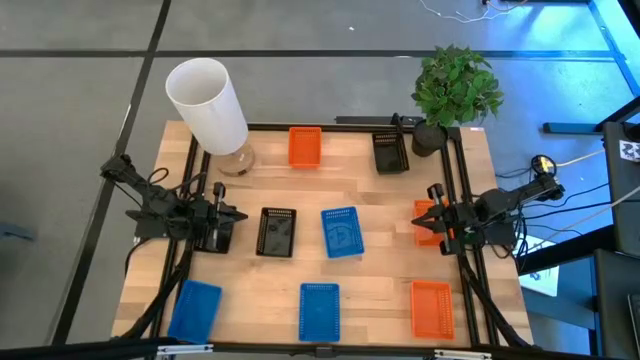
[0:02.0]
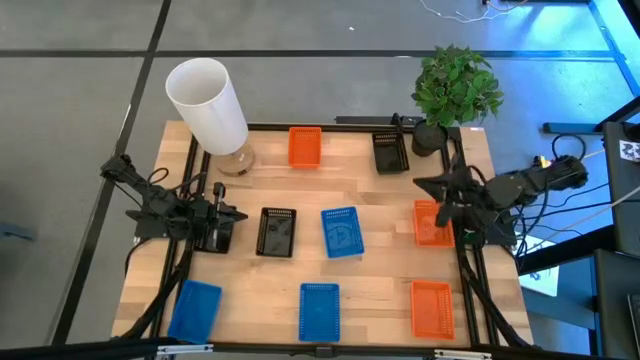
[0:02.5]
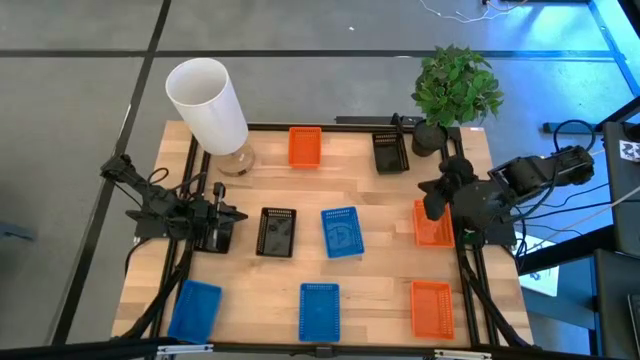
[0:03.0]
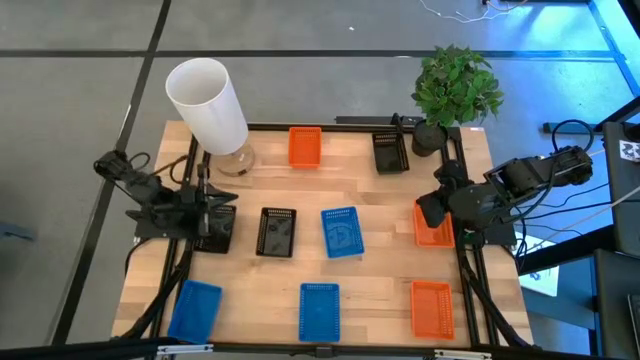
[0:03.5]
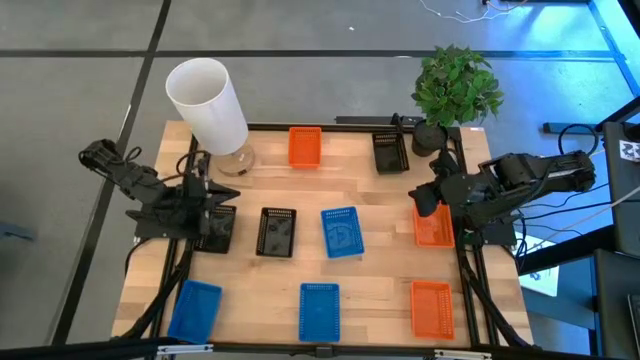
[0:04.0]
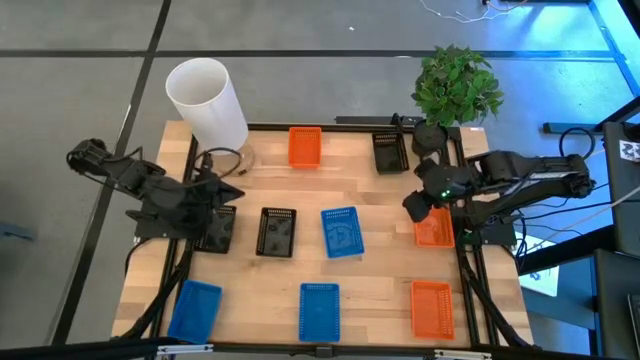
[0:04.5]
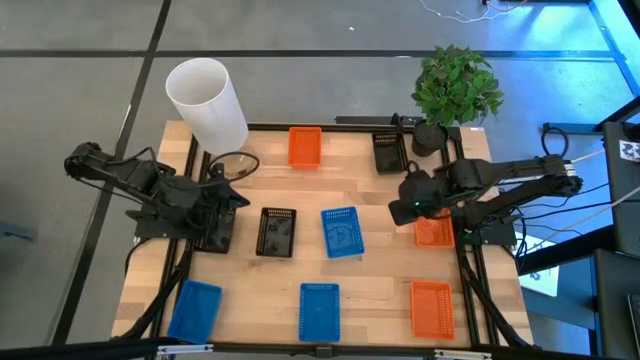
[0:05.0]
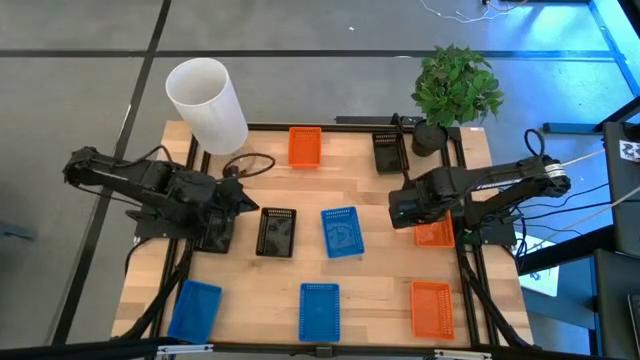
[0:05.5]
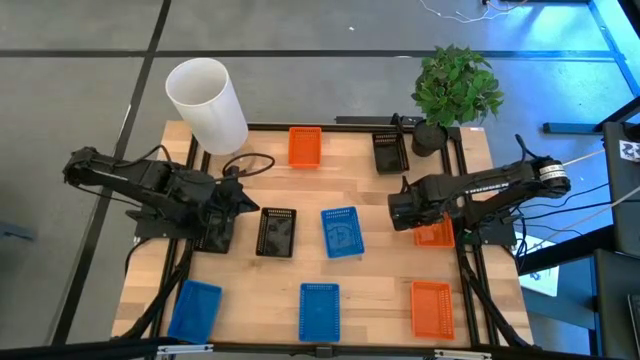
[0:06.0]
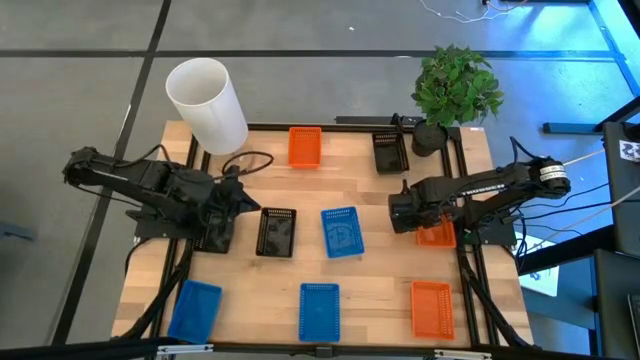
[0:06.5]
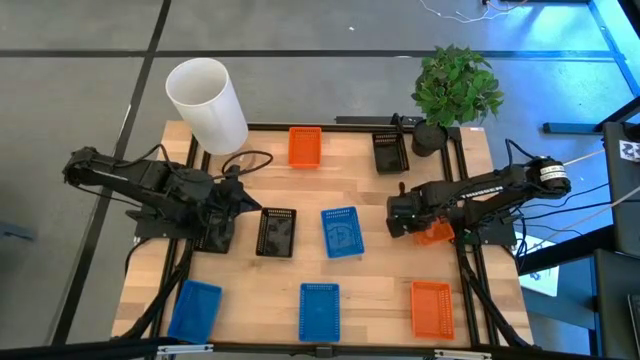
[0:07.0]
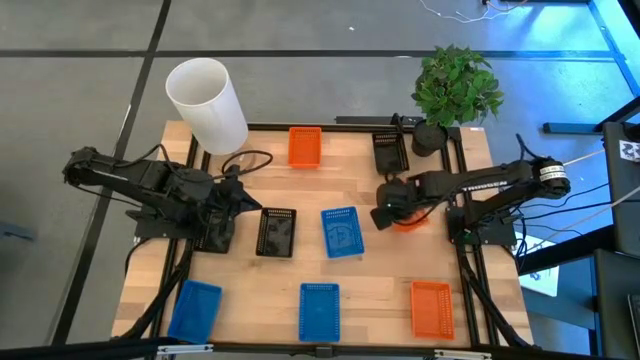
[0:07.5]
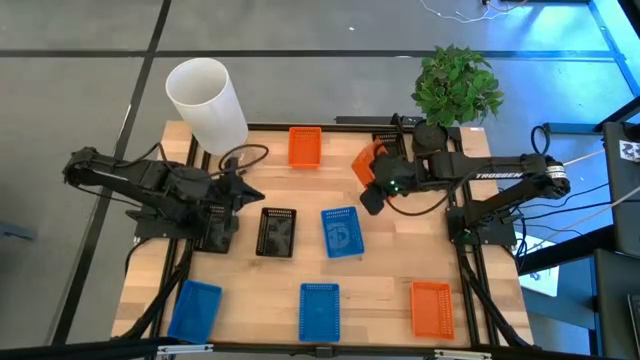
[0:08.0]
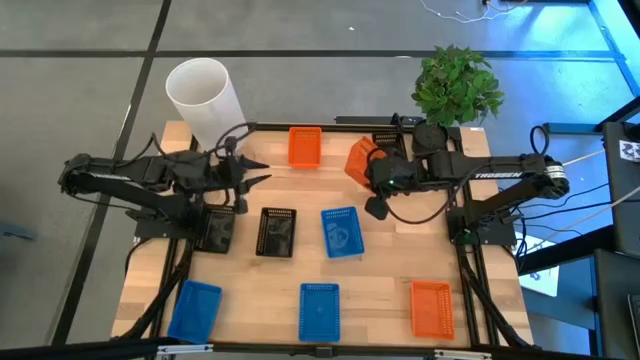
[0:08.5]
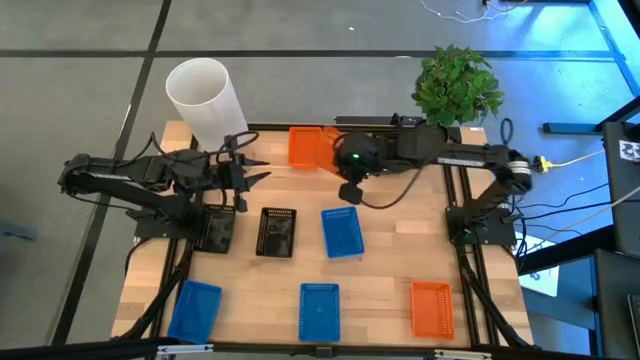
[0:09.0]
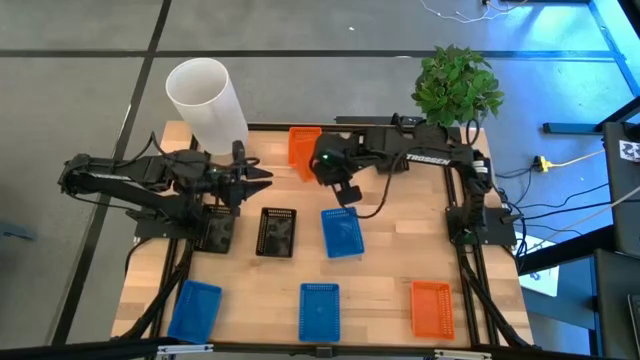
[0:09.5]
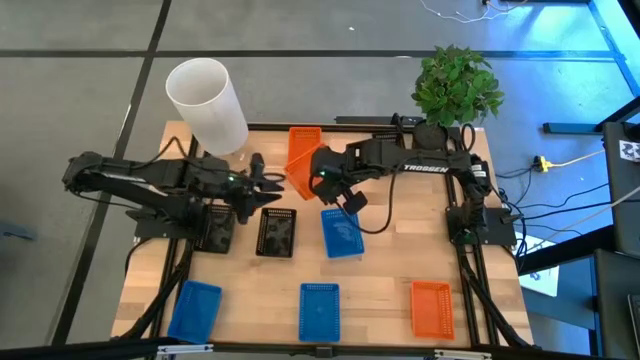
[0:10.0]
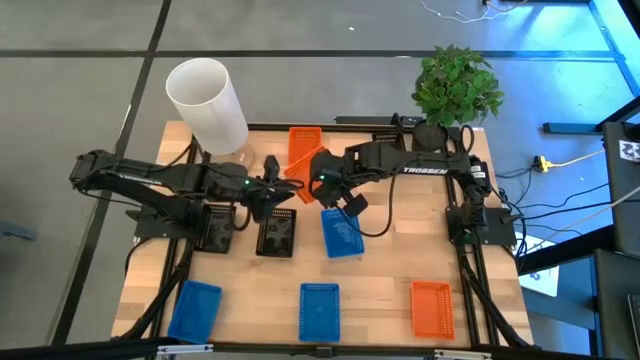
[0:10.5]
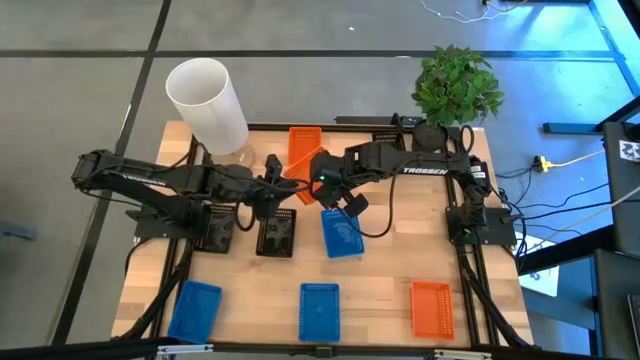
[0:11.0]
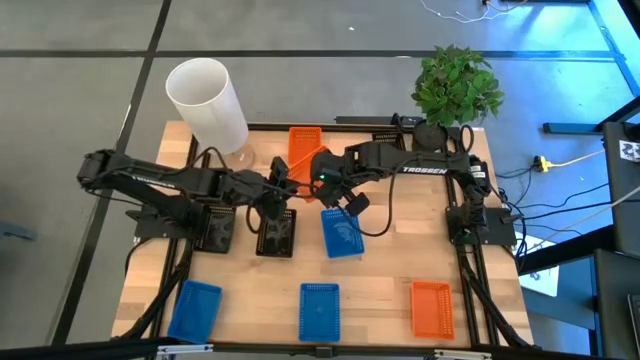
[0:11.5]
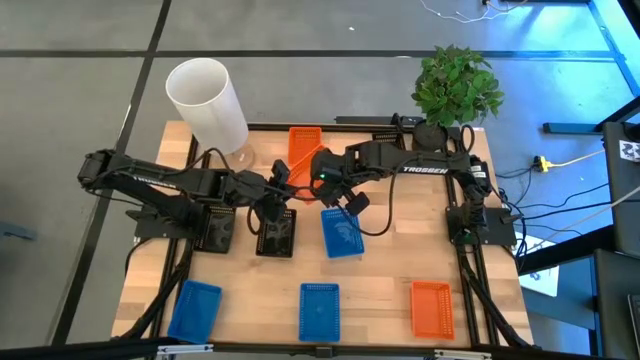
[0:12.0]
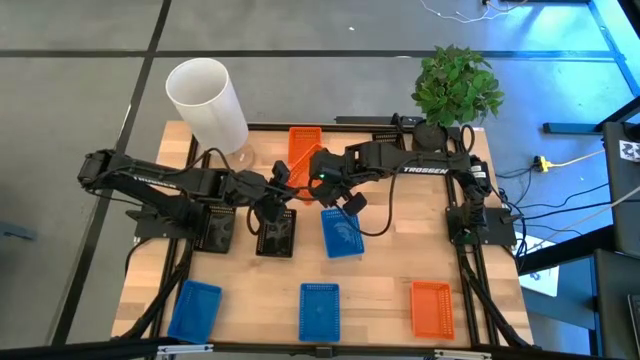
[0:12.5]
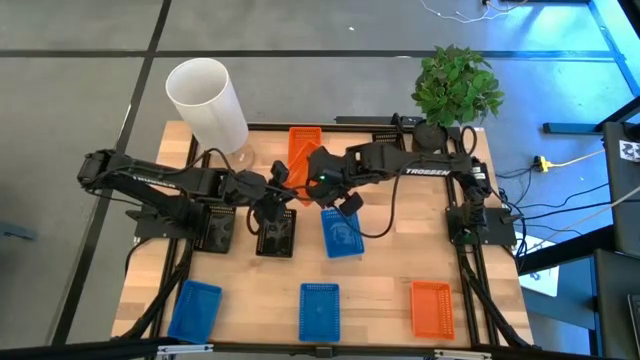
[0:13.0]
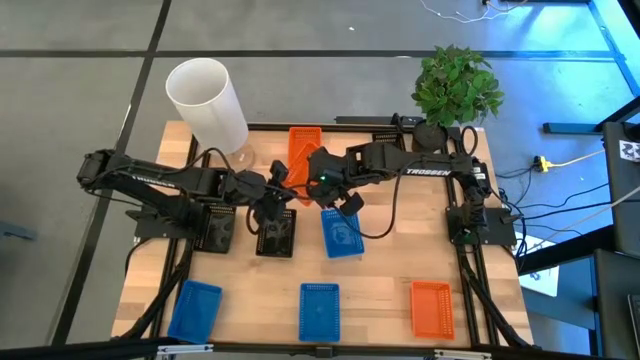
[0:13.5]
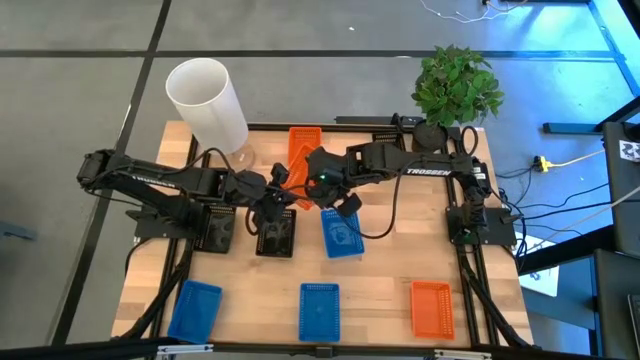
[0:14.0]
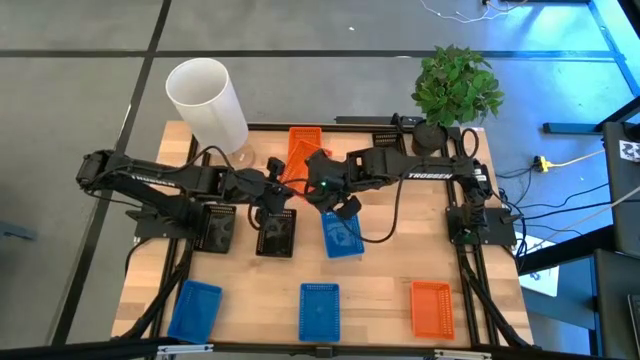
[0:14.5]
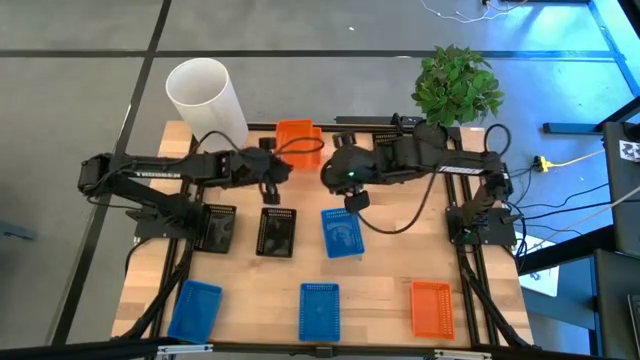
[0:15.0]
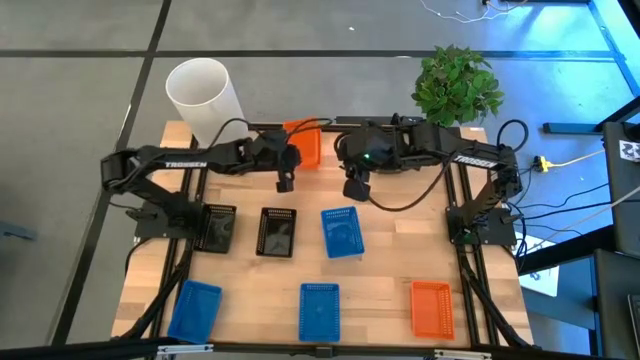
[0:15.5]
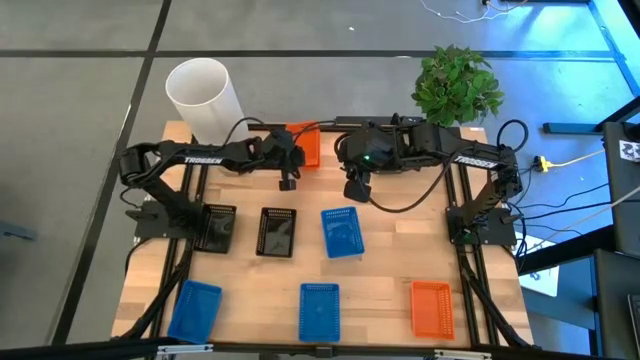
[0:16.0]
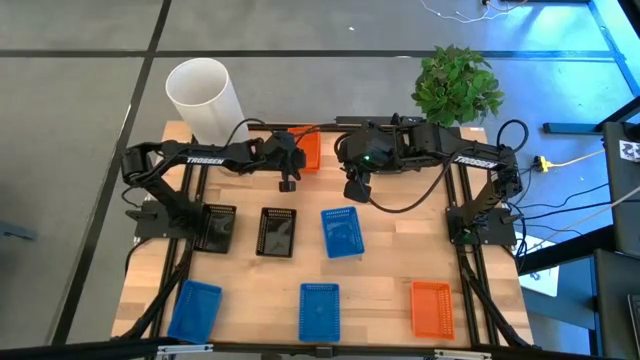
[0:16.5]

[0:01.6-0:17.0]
Stack the middle orange bin on top of the top orange bin
